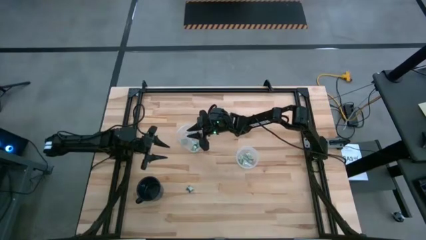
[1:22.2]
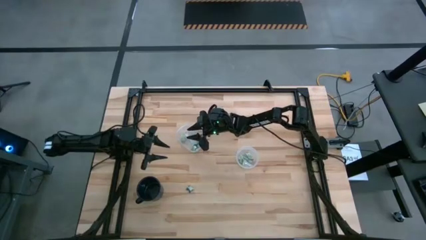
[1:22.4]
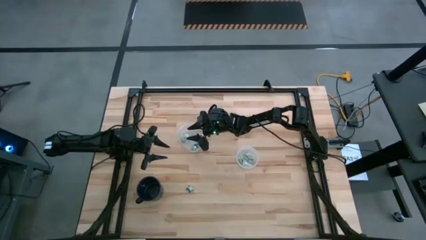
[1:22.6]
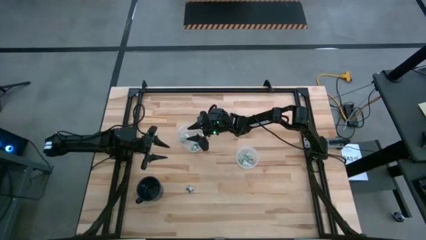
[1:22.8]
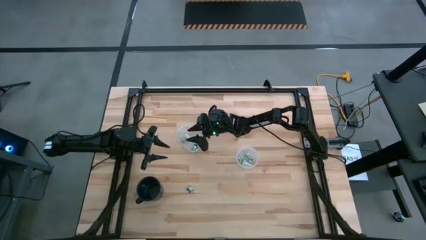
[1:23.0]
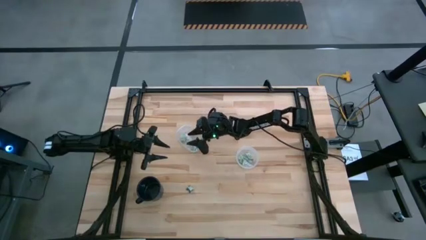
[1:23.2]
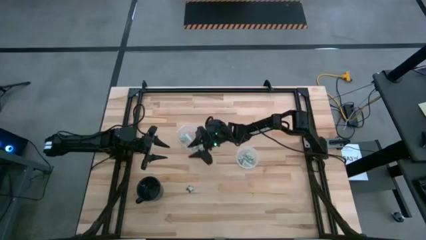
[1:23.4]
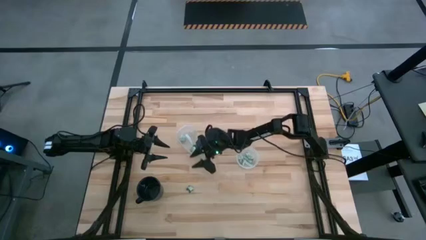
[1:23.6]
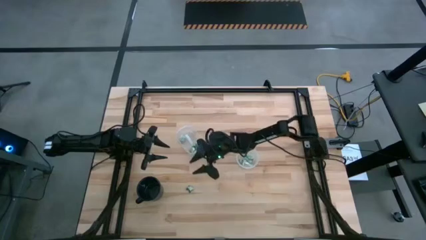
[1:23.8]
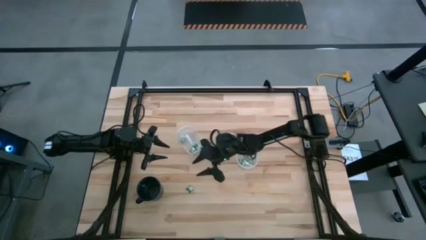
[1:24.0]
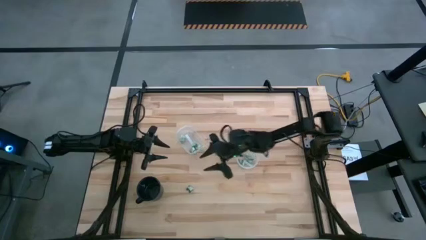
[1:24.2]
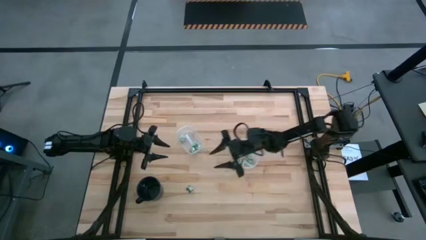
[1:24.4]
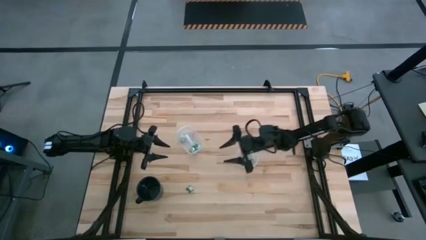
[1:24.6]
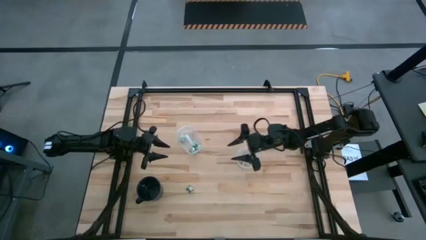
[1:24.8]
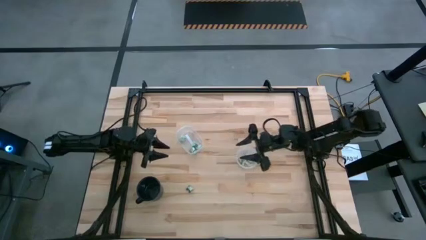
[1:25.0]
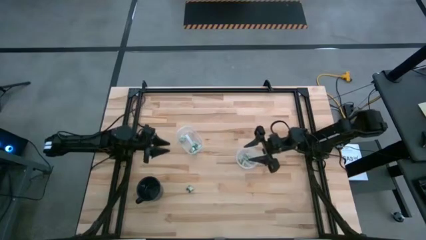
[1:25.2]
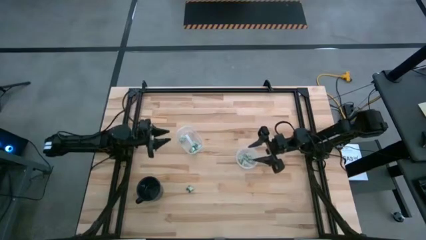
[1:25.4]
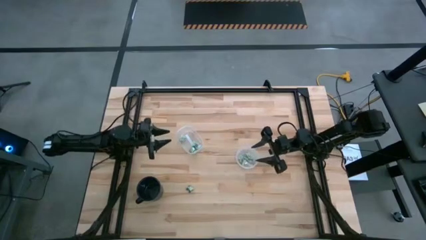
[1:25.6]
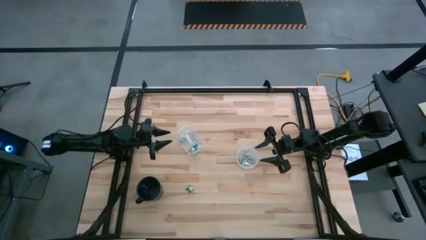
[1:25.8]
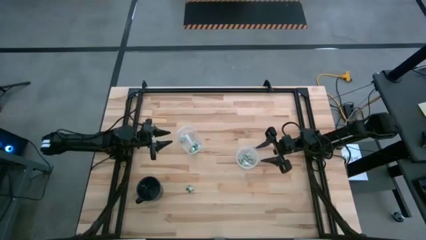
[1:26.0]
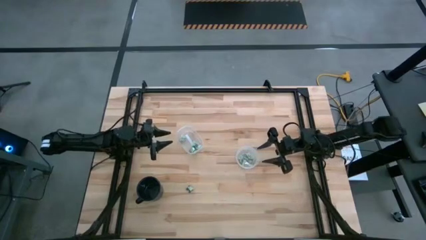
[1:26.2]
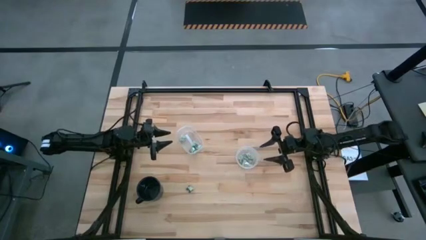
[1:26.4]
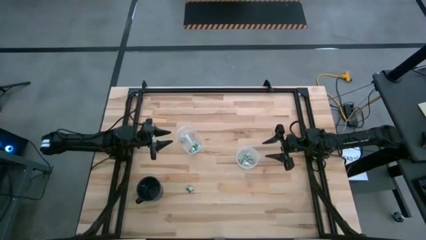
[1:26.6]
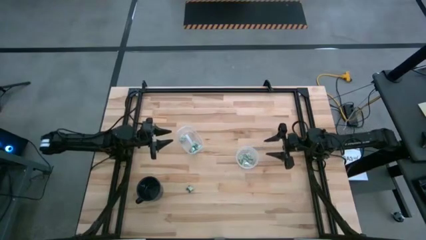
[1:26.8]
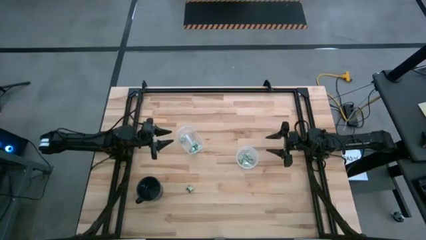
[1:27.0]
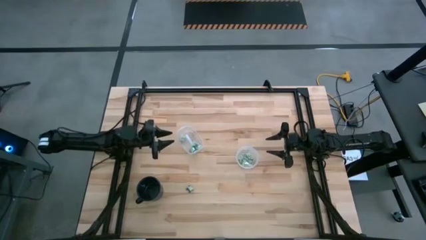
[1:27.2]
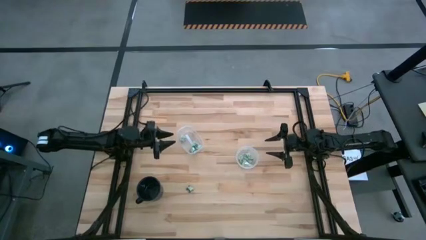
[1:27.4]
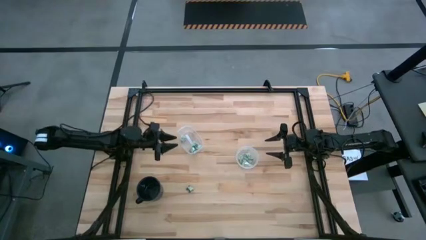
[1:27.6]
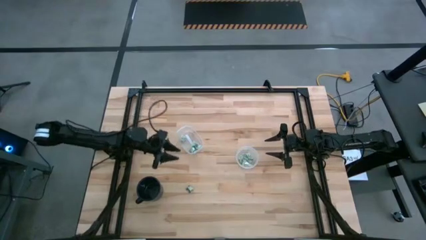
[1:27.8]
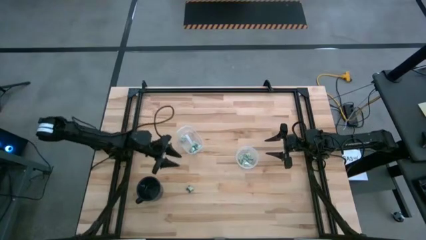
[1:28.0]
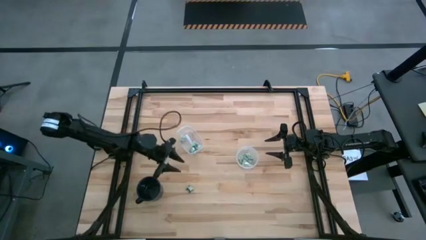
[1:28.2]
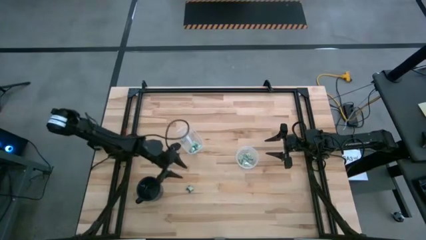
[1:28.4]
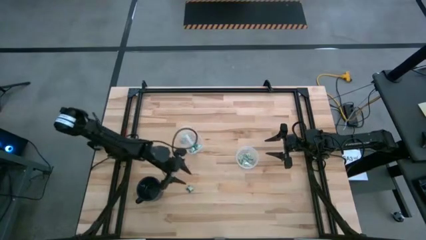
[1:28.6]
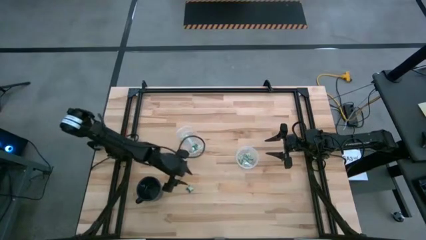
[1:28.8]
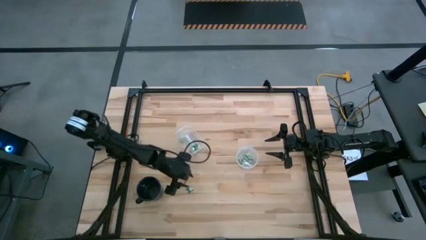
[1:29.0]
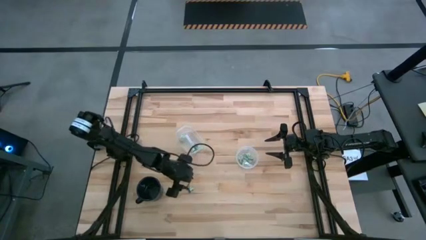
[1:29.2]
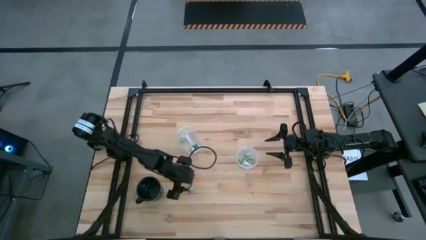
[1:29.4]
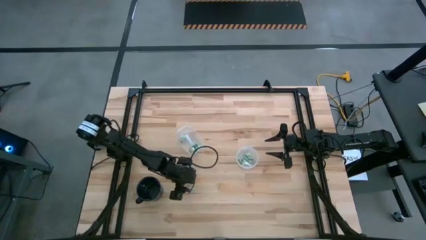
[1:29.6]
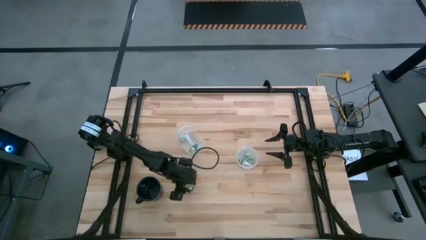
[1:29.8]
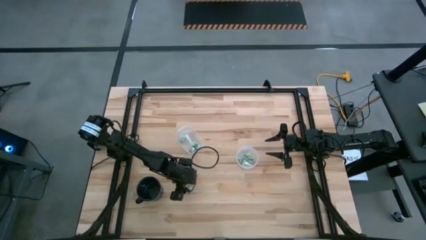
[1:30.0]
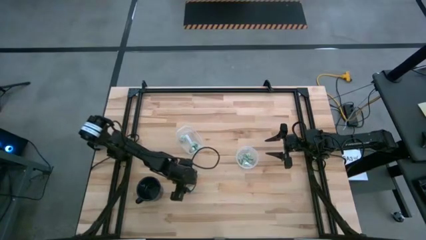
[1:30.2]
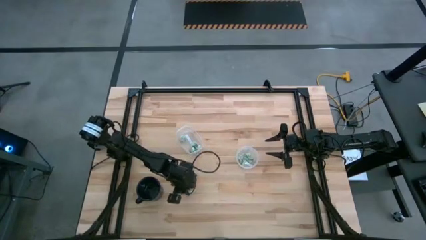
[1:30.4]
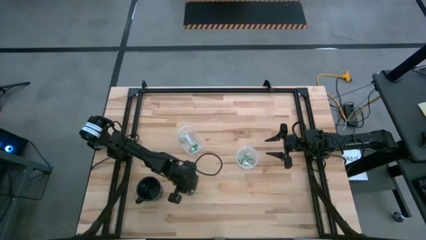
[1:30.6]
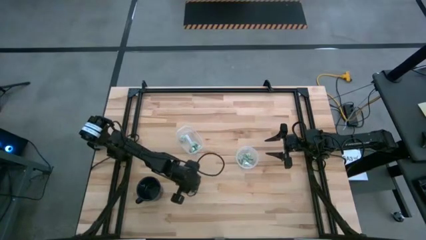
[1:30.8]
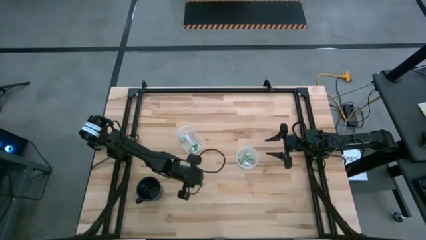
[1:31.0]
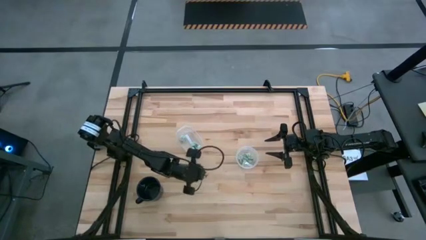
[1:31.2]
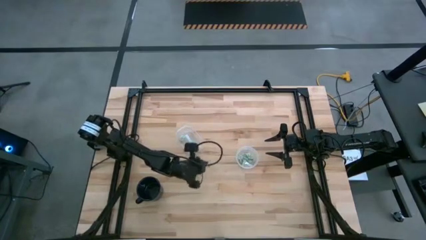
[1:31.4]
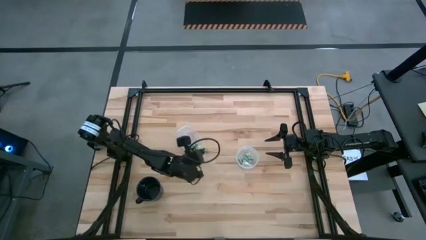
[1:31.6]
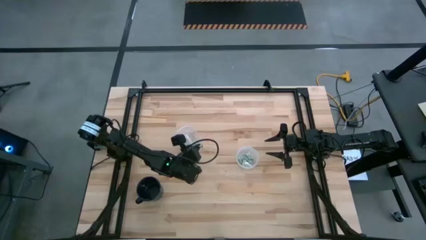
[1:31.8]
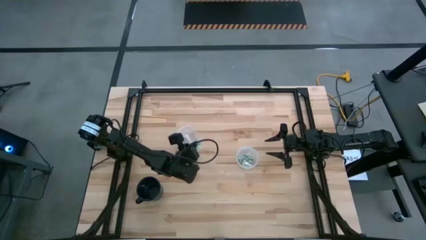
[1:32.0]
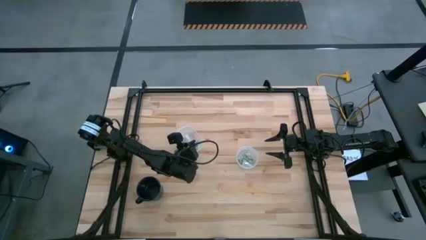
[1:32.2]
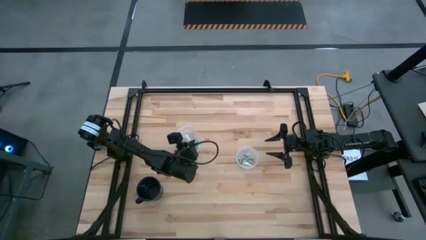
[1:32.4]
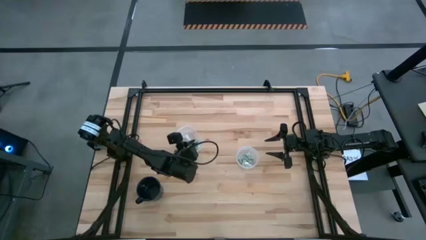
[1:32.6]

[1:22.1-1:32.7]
Task: Pick and place Stevia / Truvia into bins
Put the green stevia packet into the left transparent container
